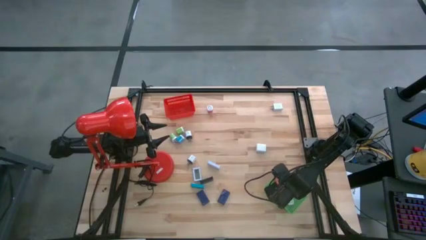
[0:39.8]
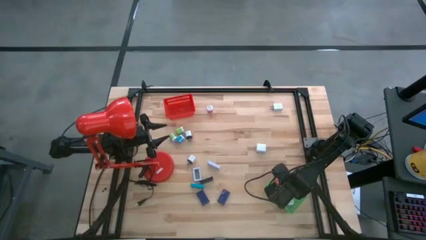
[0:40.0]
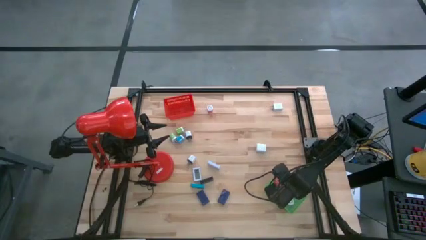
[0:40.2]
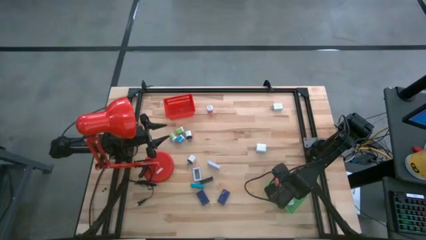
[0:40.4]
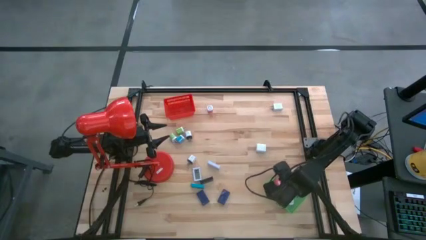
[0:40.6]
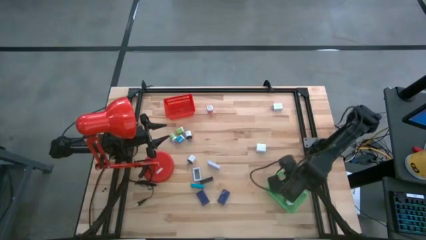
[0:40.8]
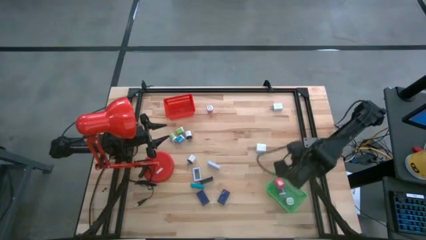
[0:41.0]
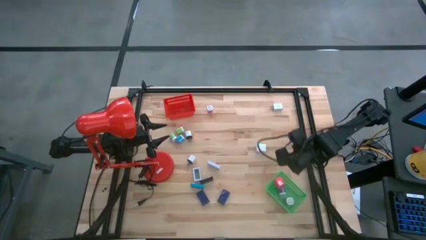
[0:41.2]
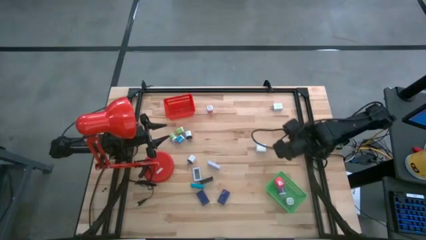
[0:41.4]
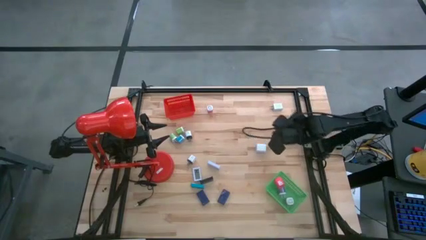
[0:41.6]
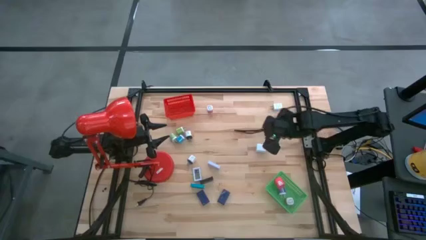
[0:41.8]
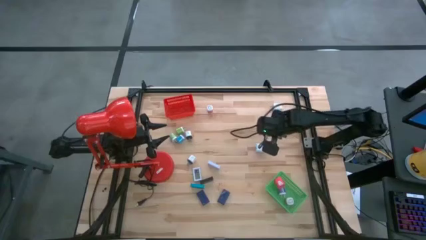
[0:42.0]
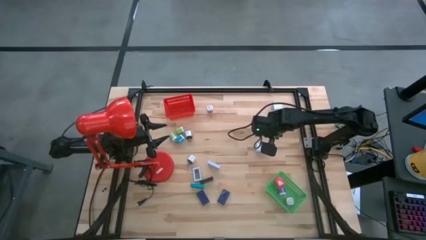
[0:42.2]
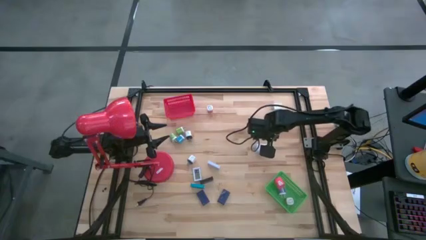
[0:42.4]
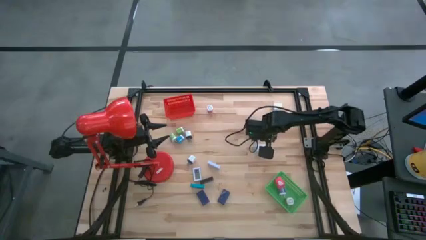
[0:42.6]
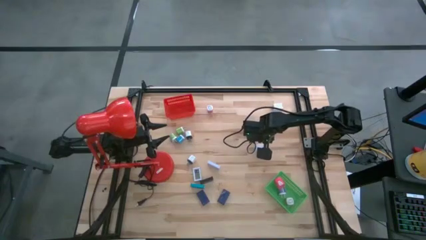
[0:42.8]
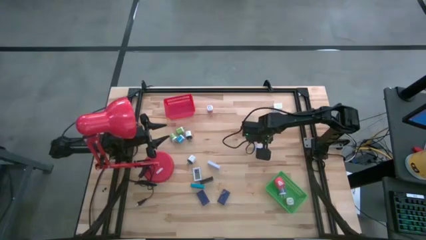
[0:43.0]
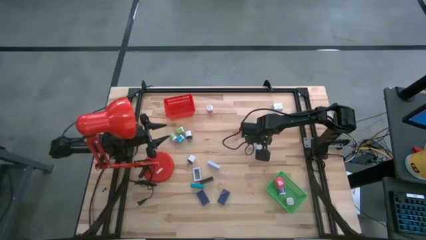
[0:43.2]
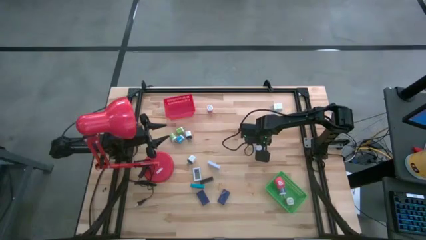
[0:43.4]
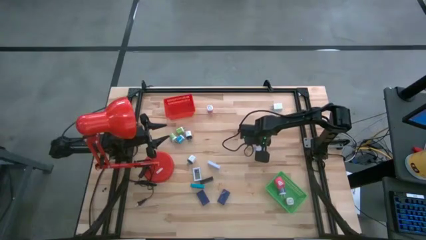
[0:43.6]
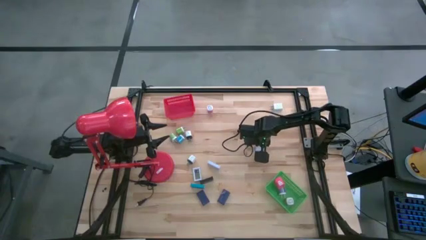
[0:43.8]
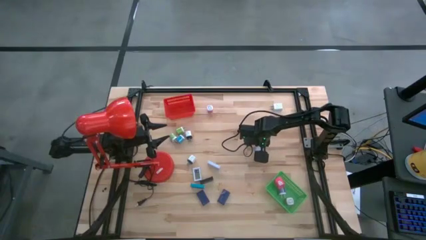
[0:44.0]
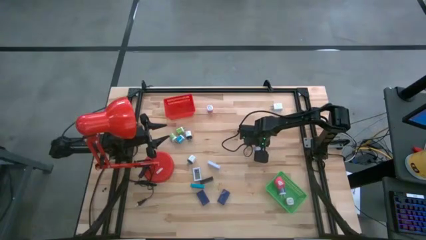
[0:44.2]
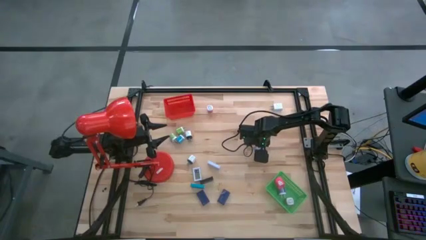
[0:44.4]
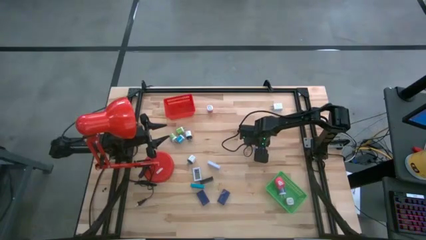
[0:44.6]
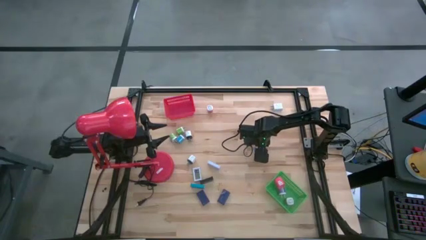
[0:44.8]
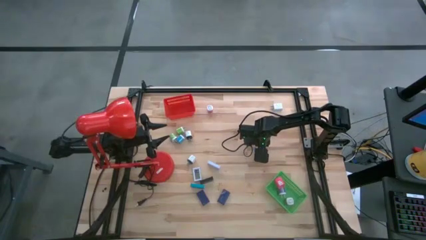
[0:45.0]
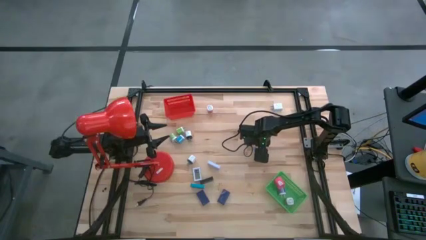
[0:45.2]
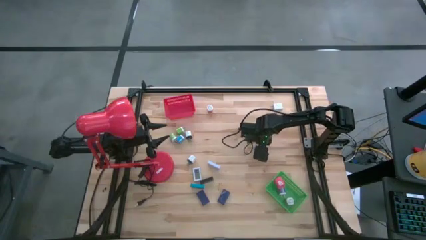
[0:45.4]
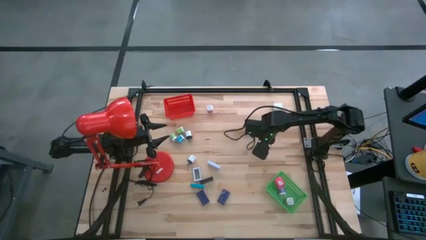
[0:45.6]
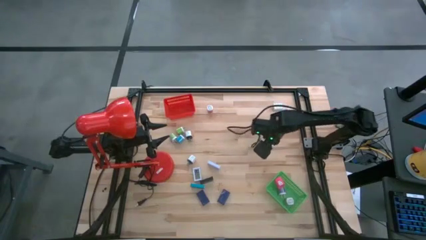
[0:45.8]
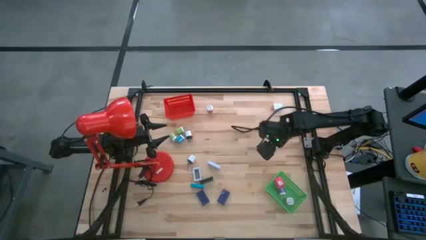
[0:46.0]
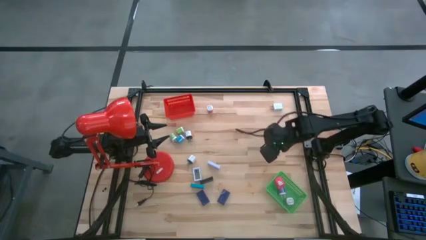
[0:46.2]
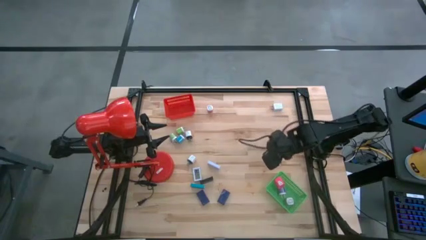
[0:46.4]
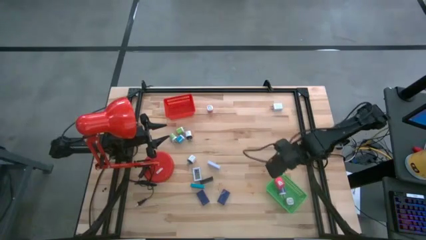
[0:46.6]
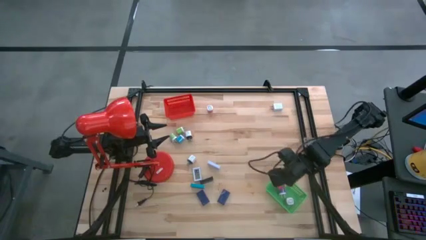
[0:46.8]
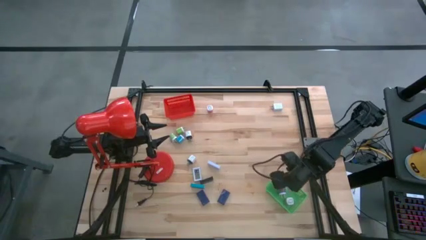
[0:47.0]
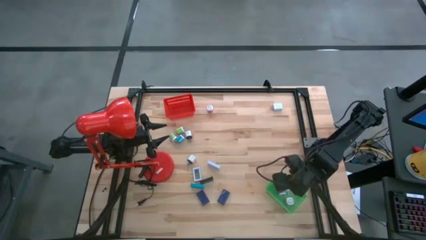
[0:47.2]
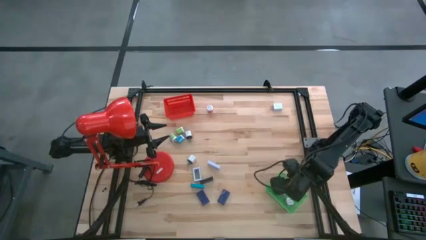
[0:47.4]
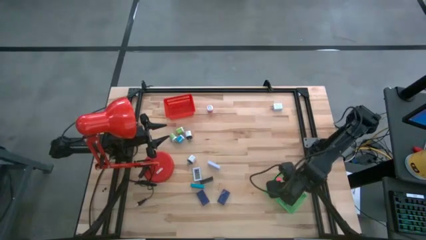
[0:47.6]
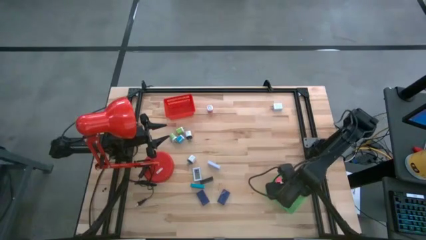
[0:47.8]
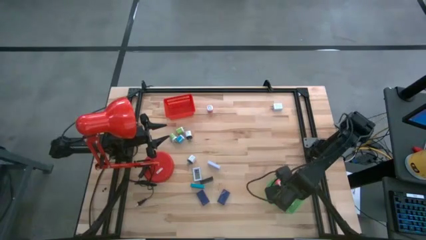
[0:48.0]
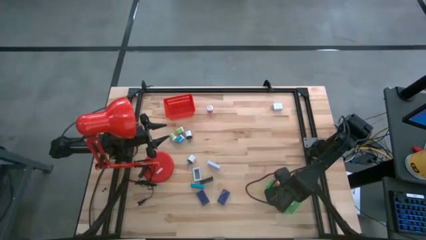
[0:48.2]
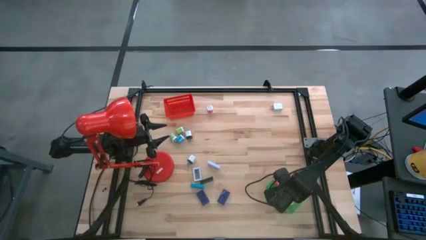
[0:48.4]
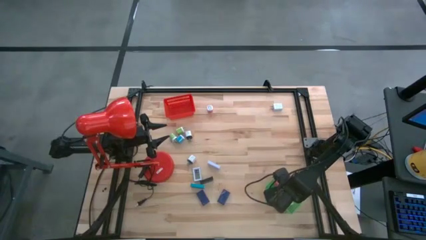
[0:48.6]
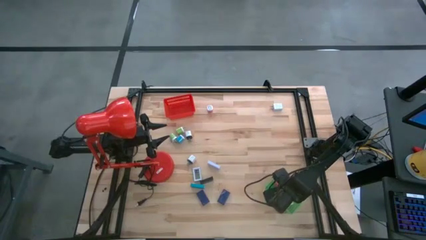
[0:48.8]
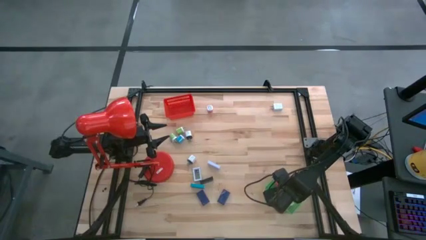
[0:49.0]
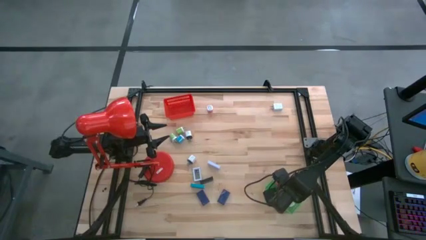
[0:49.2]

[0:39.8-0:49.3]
Task: Pick & Place Office items
Put the bottom white charger adapter into the green bin

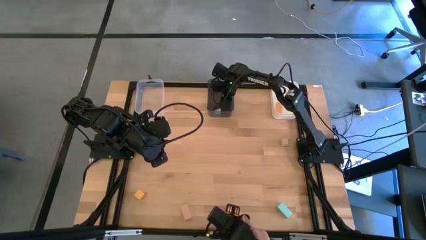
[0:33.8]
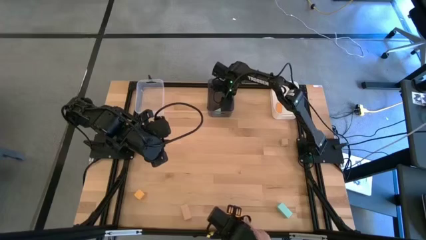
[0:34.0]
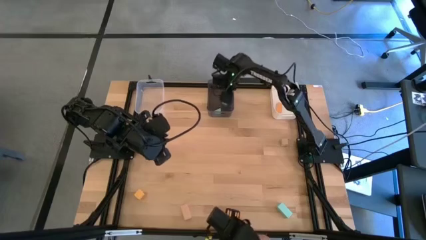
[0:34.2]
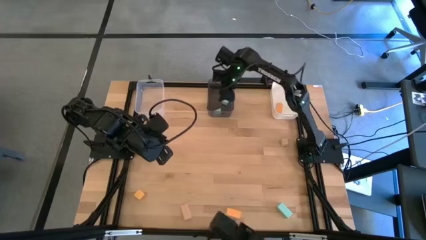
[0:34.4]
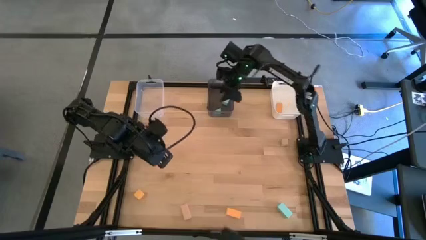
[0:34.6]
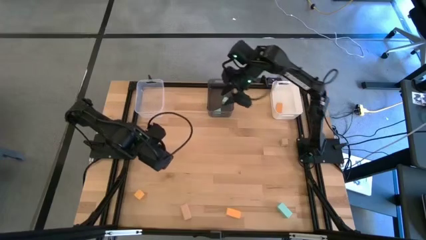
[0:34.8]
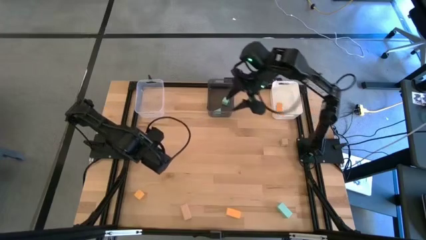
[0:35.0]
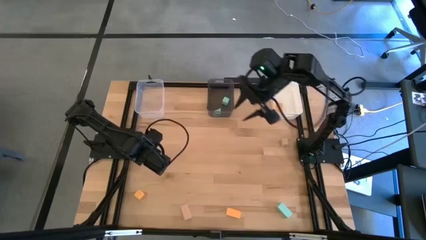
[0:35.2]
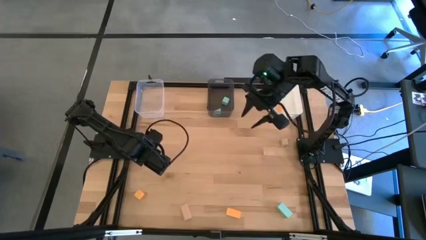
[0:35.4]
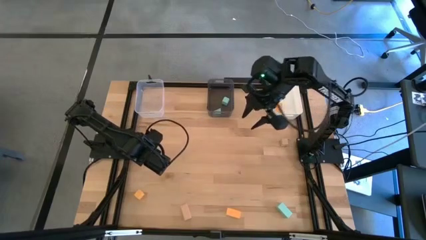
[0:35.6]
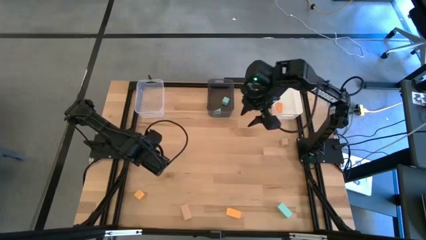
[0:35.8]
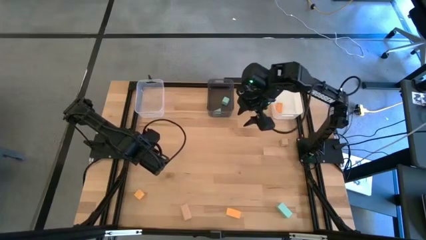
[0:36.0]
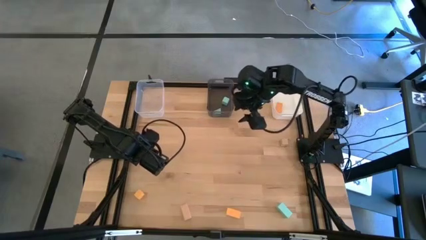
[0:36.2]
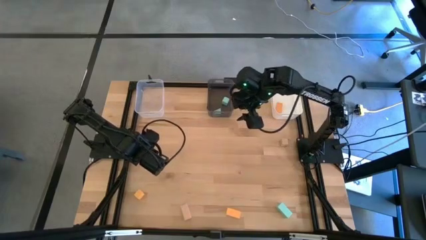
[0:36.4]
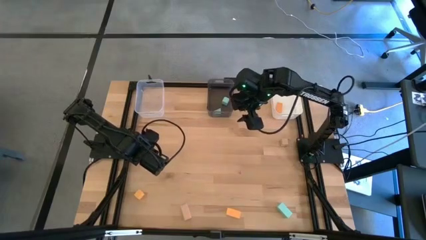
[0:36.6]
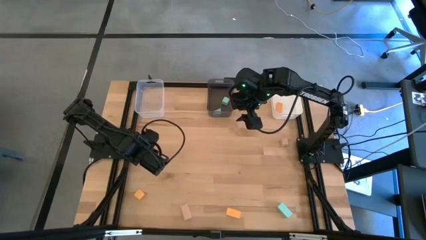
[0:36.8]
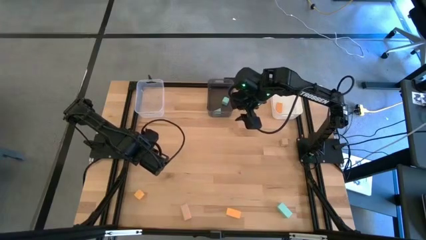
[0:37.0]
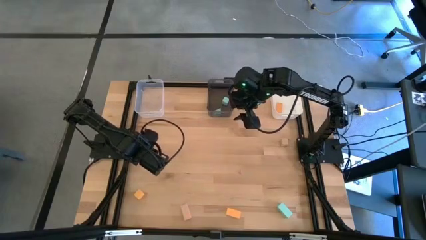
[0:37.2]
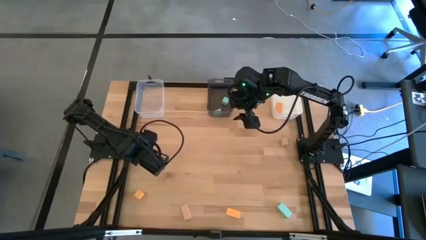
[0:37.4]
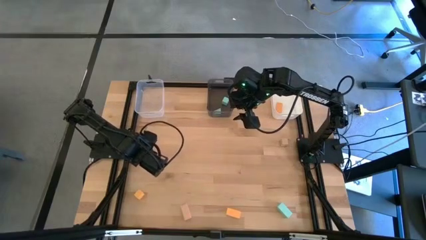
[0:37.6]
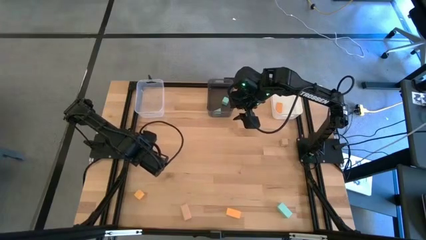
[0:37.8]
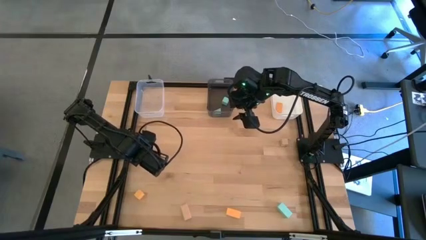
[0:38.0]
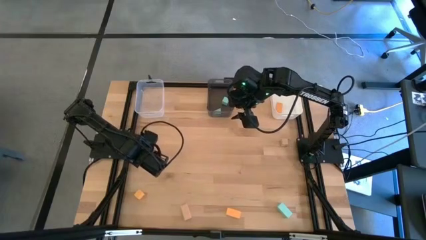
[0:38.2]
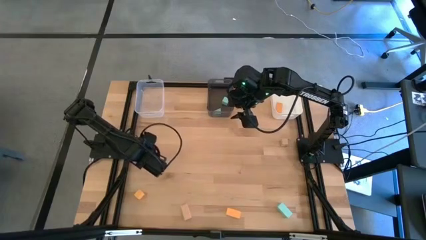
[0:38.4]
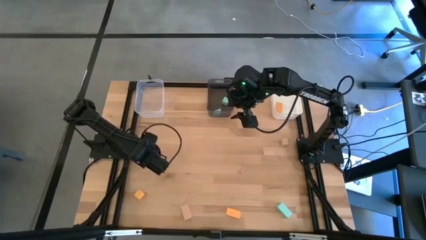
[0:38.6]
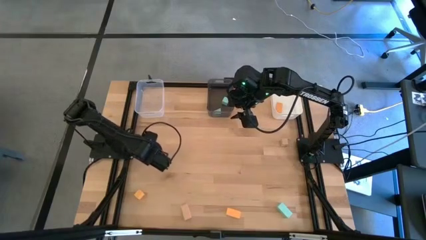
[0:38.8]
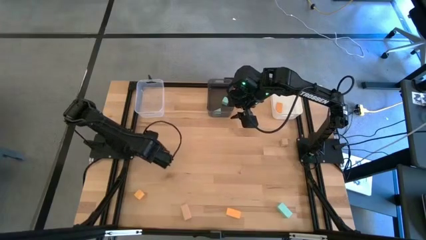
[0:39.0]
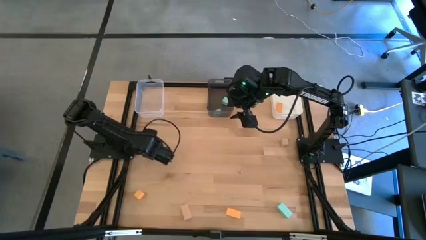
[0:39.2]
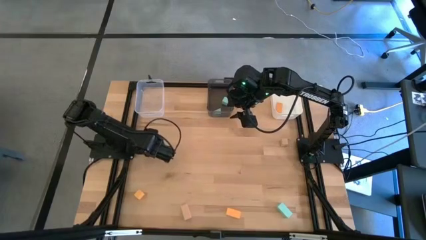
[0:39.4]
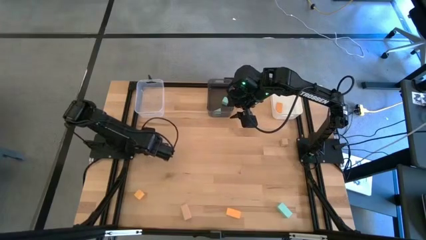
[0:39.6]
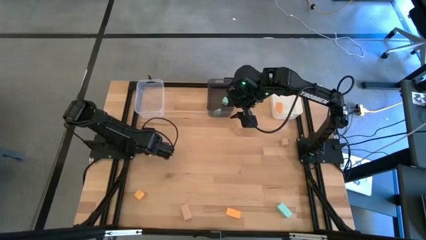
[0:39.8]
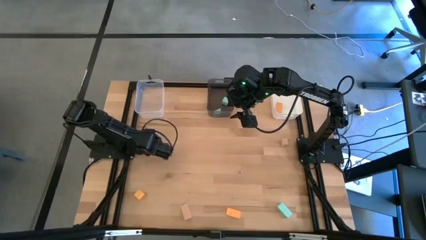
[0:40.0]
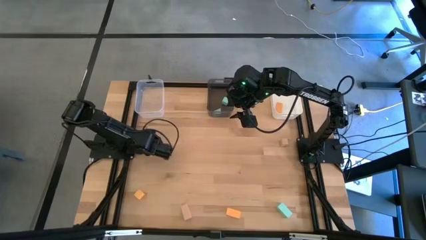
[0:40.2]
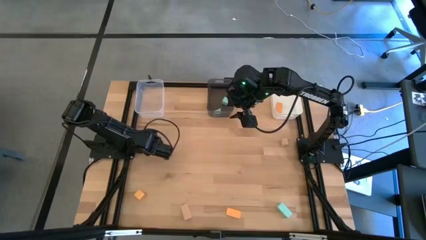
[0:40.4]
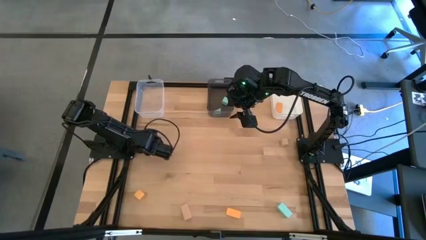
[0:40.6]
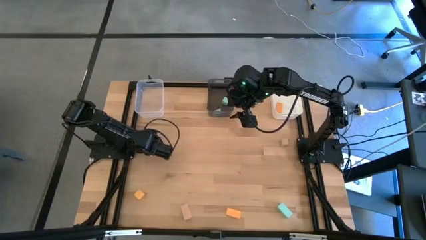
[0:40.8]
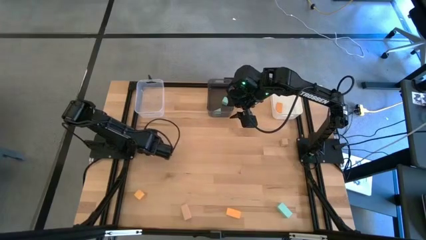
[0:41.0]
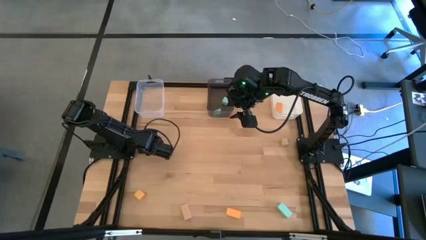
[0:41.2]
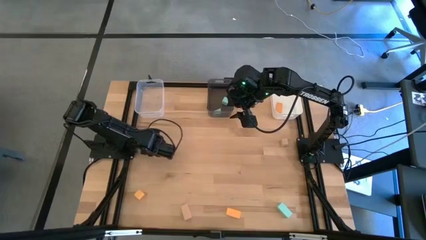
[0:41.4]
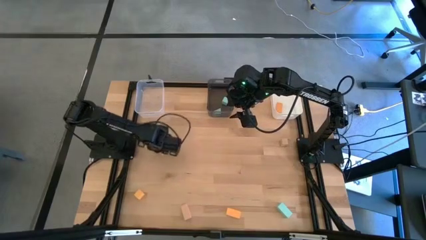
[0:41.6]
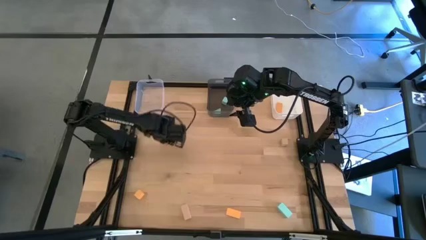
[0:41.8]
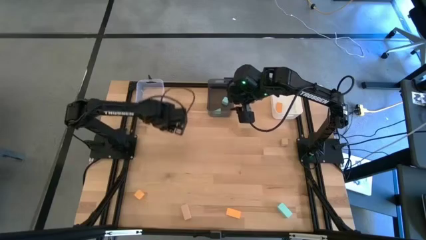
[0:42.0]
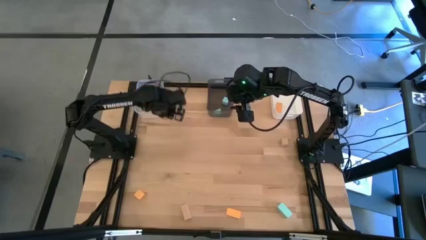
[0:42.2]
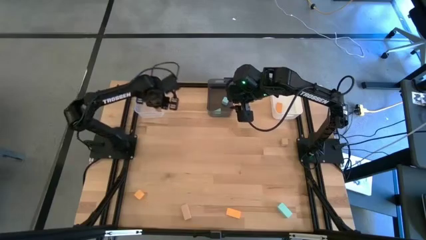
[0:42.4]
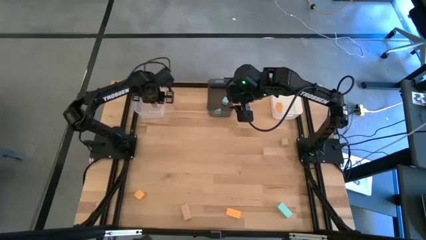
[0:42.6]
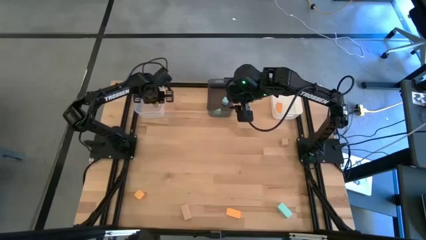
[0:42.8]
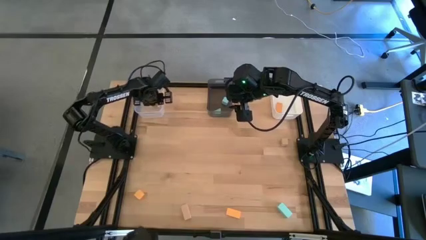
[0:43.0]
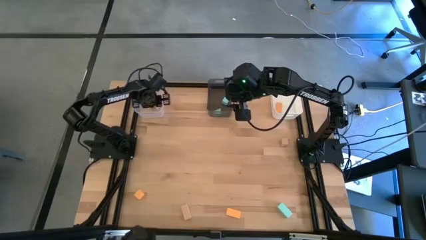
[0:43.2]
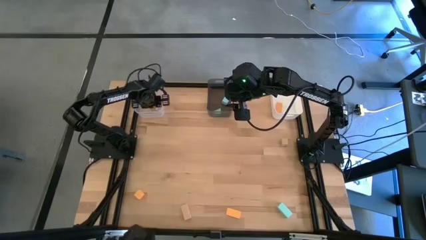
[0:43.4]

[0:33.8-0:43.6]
Task: Sort & place blocks by color
Put the top left light brown block into the transparent bin
